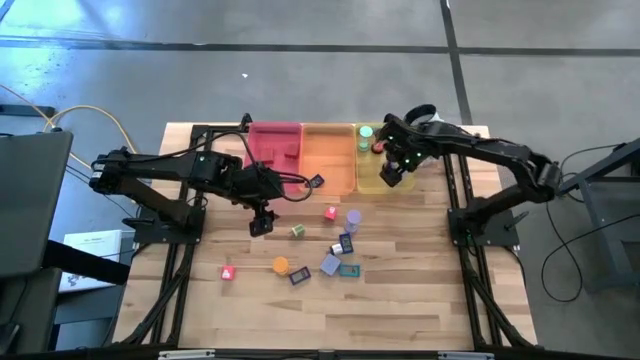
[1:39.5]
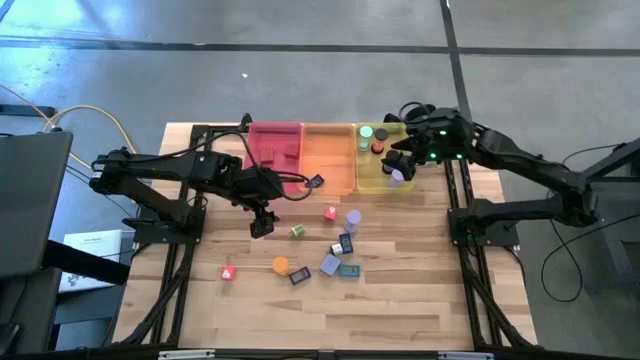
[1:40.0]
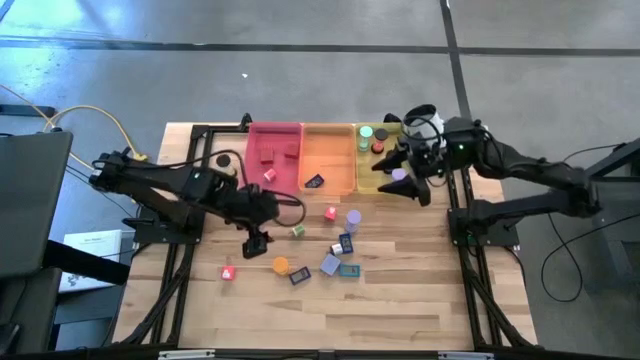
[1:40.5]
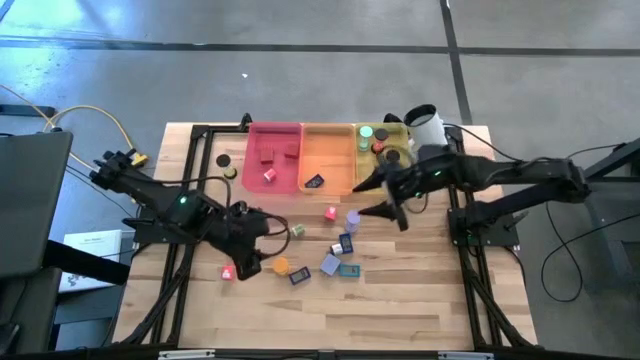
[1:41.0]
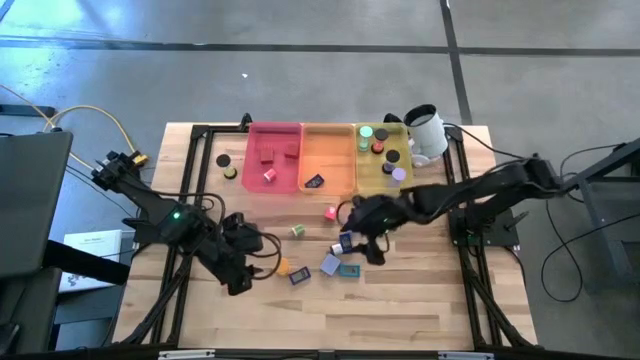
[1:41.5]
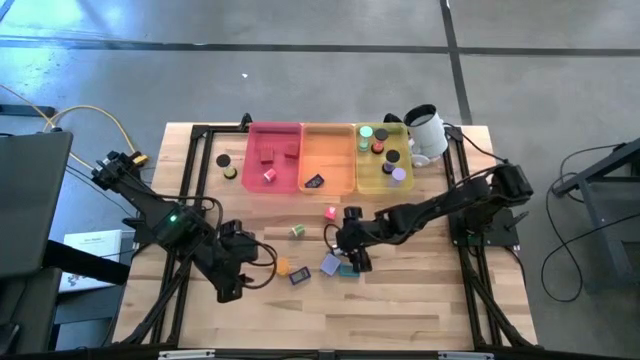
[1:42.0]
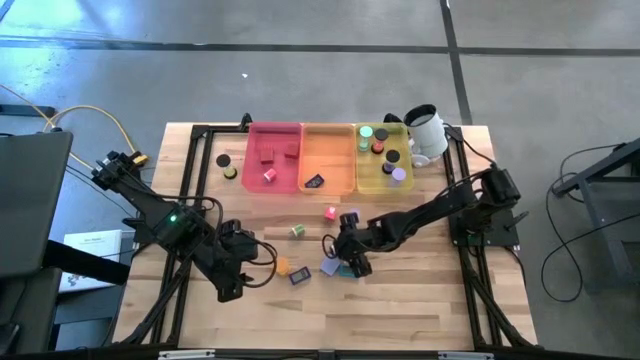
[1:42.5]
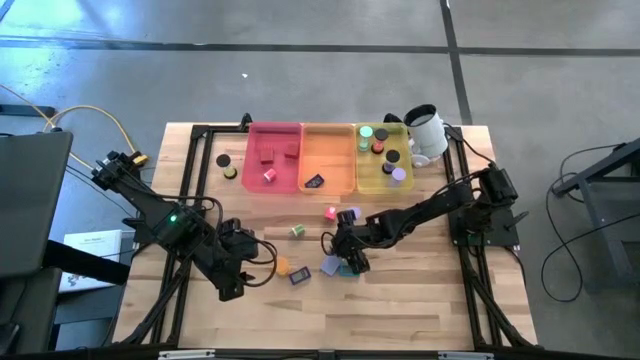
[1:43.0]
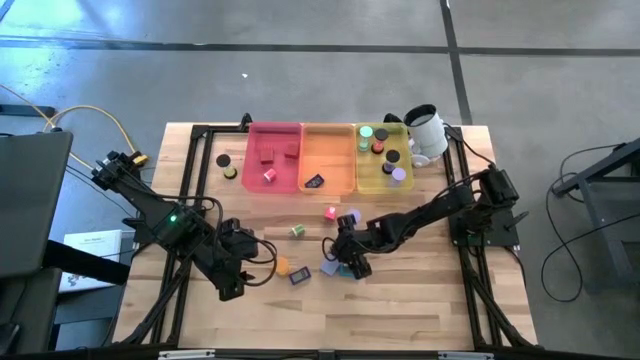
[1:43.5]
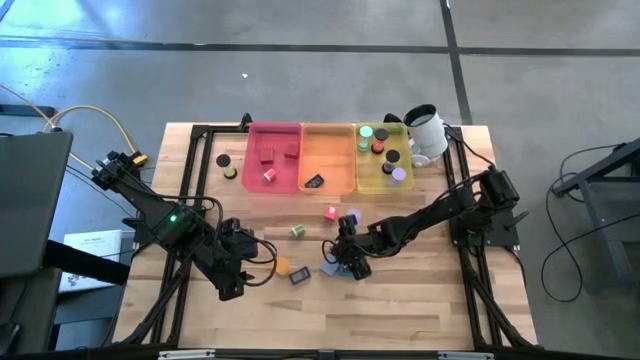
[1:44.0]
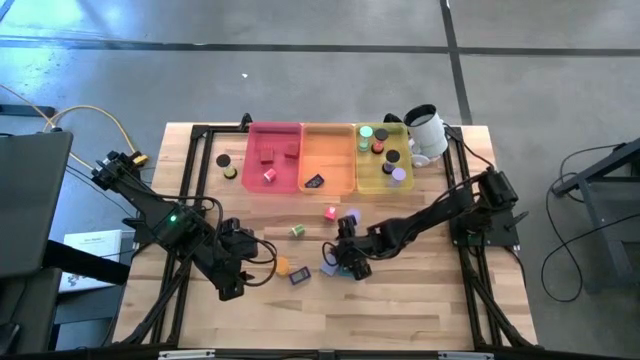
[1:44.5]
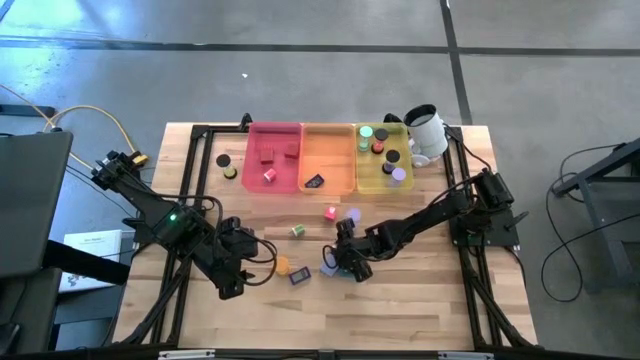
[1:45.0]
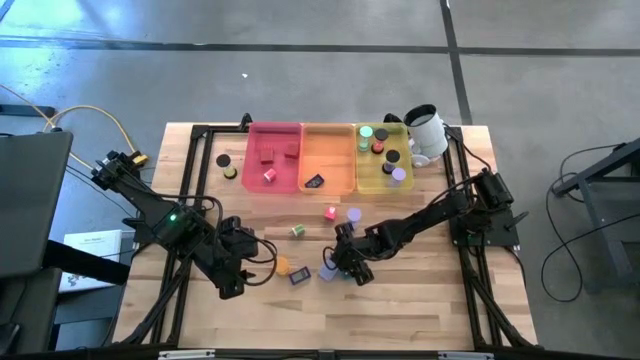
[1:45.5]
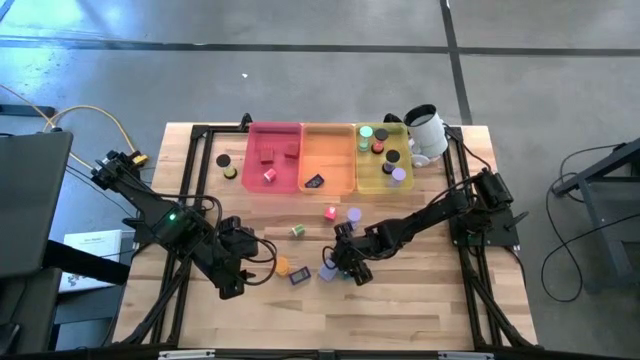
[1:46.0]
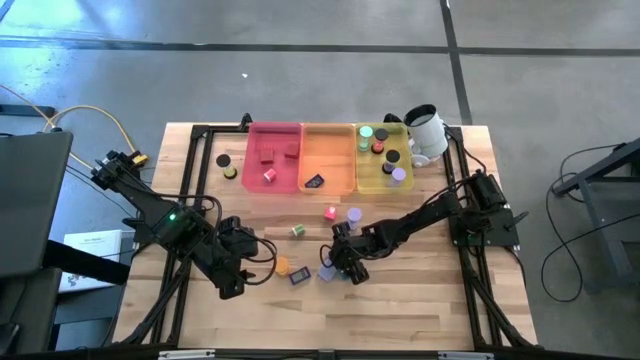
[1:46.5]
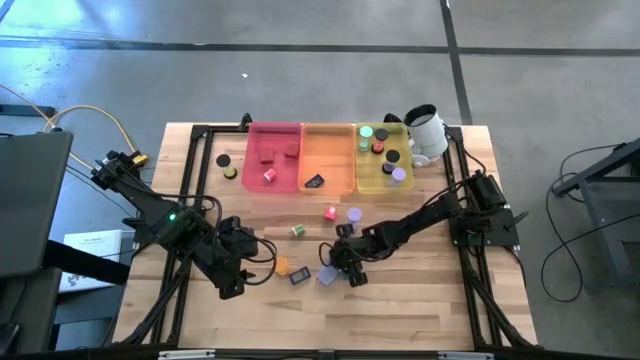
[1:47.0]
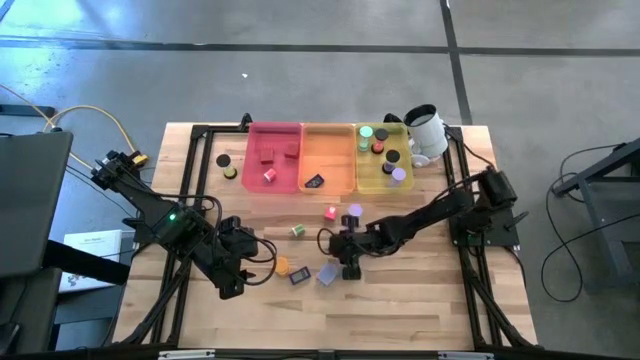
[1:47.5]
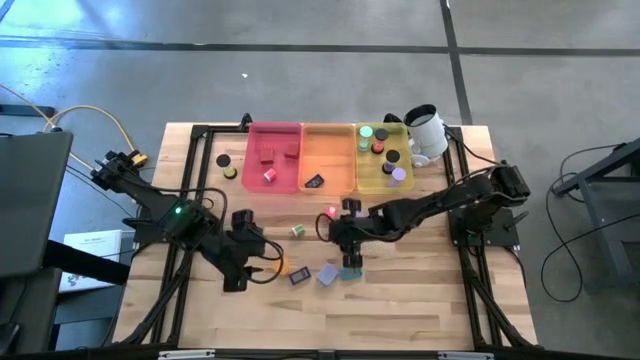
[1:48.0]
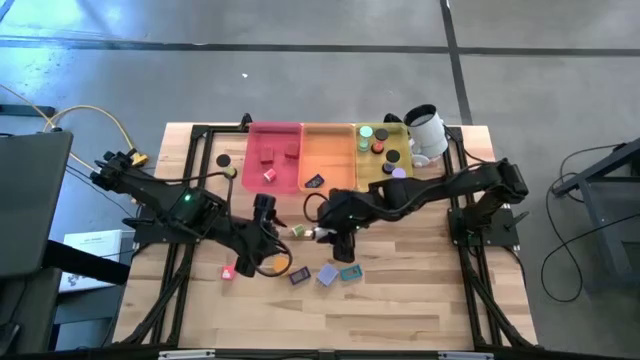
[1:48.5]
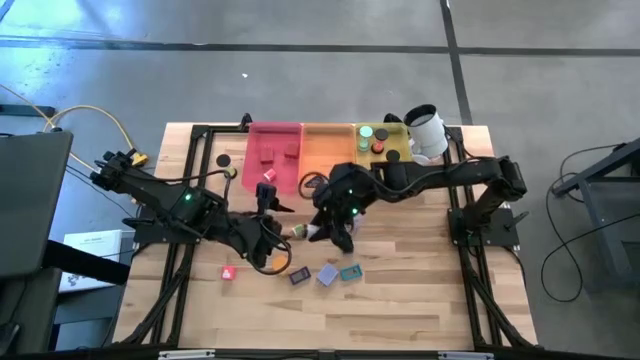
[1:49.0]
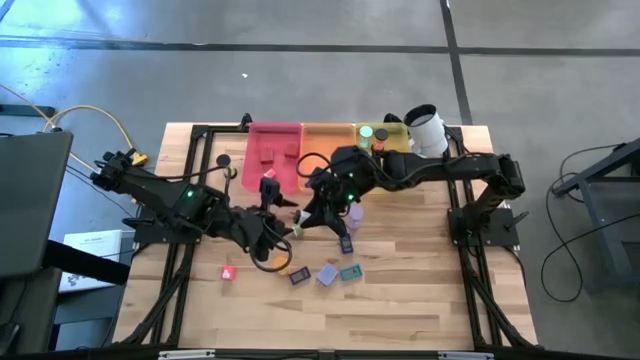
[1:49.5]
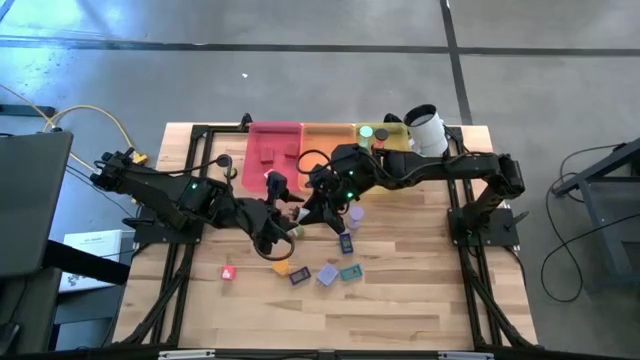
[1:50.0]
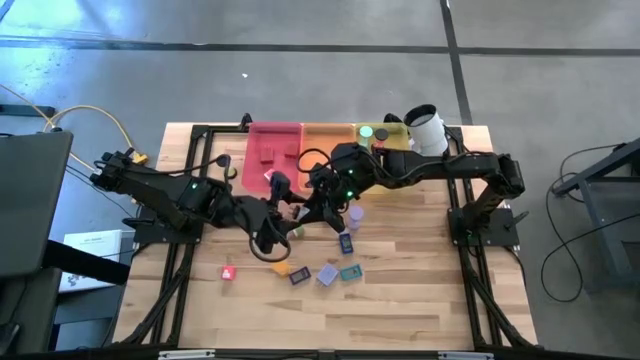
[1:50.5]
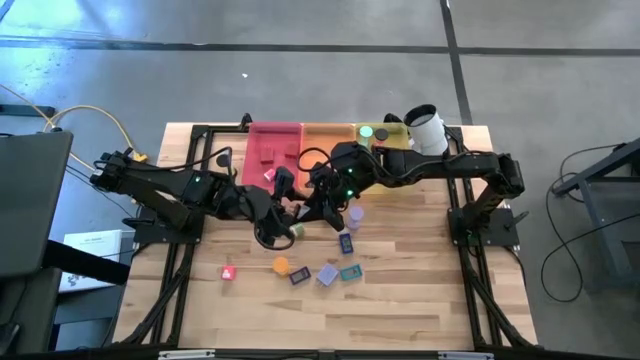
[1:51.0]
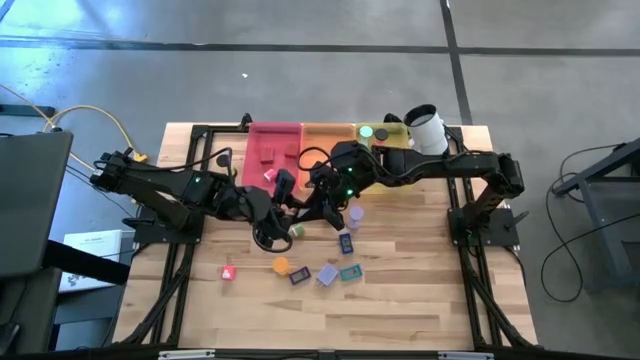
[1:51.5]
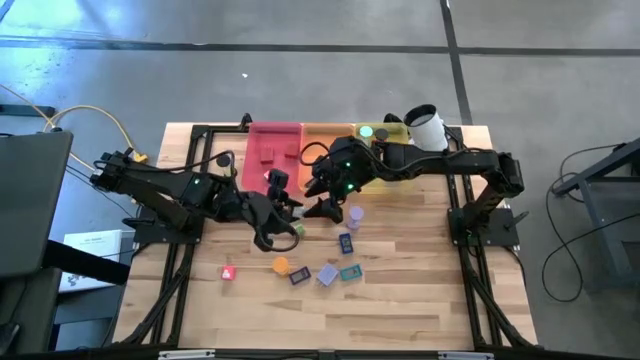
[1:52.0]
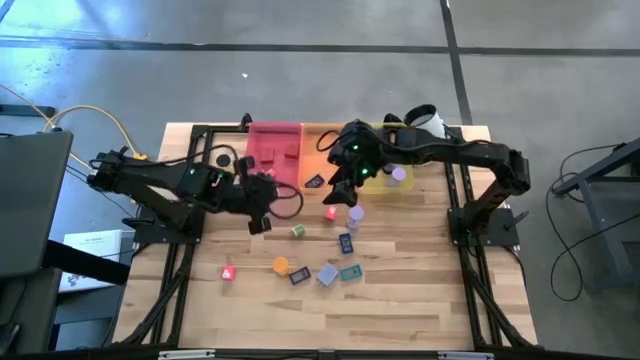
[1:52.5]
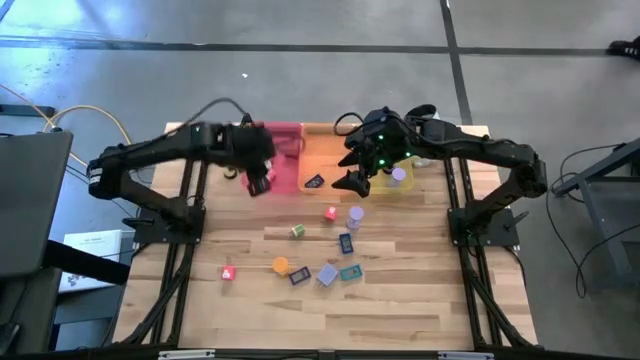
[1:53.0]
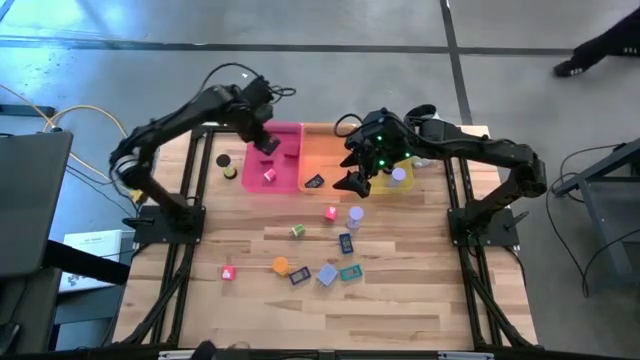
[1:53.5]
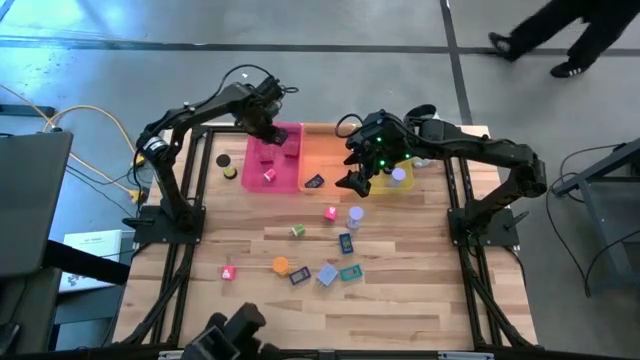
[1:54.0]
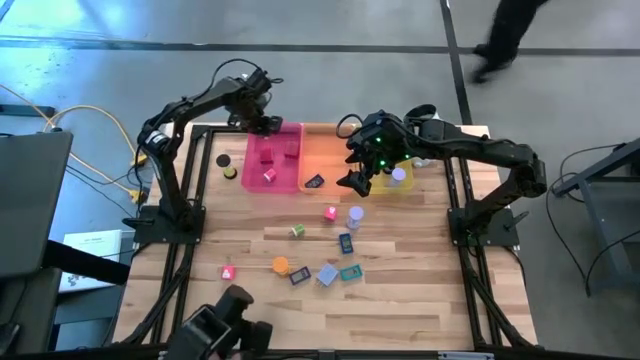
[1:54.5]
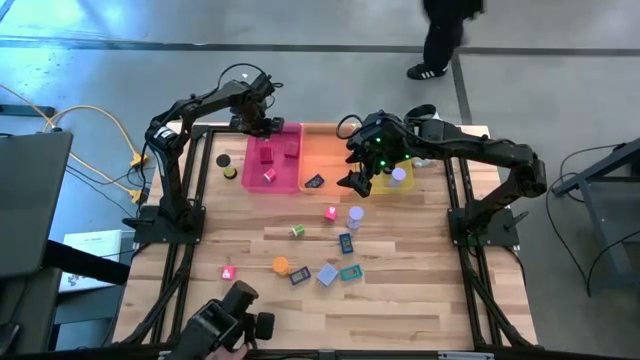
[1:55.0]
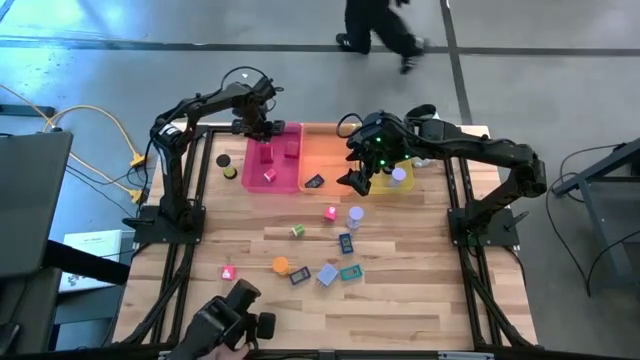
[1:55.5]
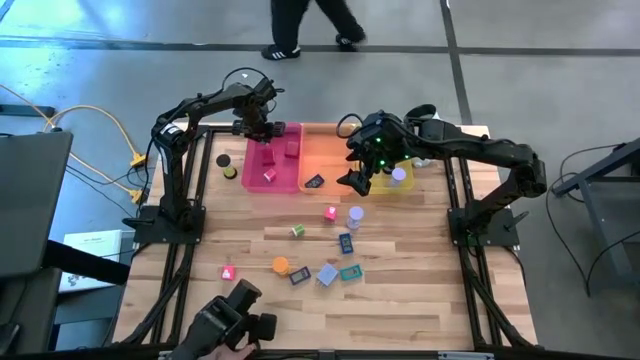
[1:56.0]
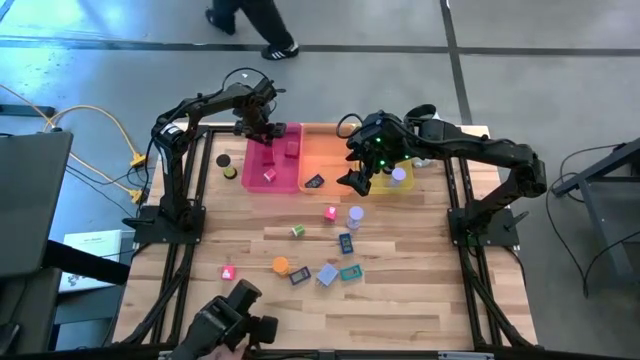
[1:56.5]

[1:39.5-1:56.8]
Task: Pick & Place Office items
Put the white charger adapter into the pink bin

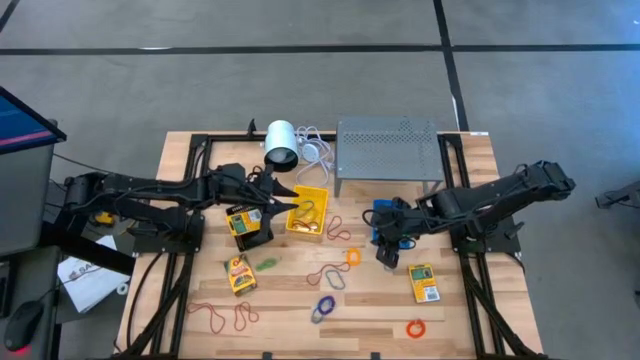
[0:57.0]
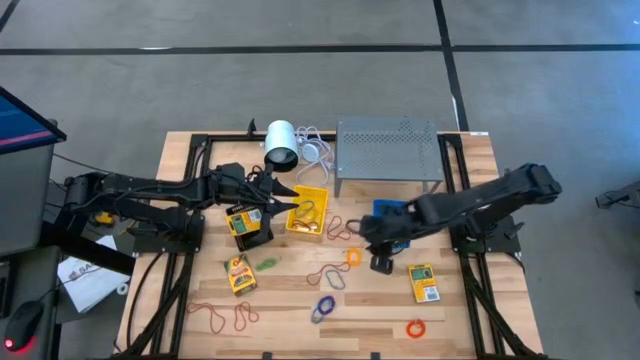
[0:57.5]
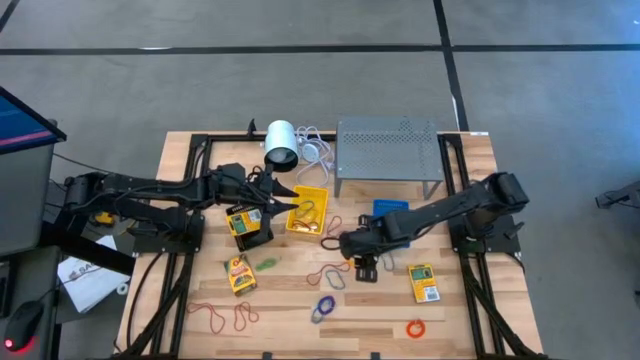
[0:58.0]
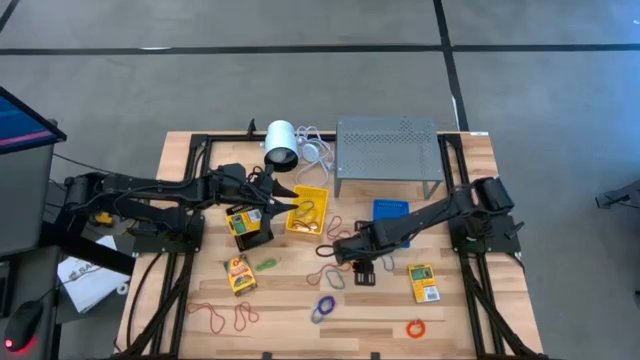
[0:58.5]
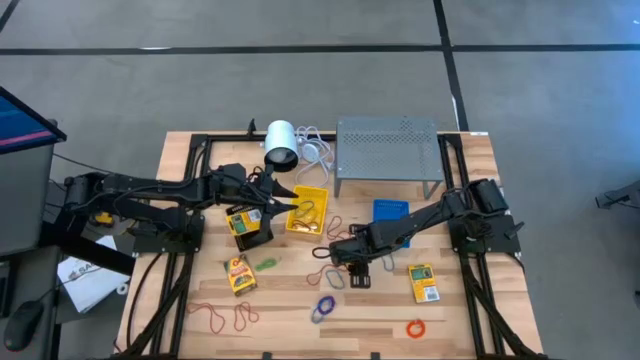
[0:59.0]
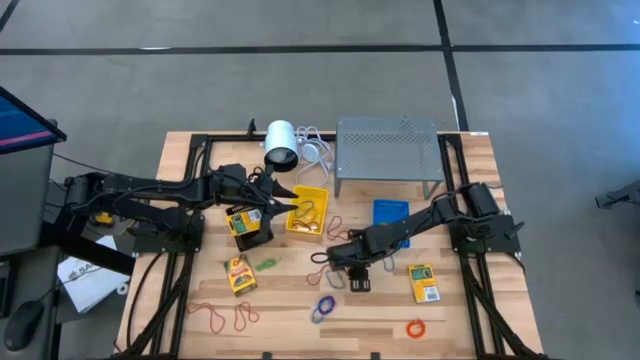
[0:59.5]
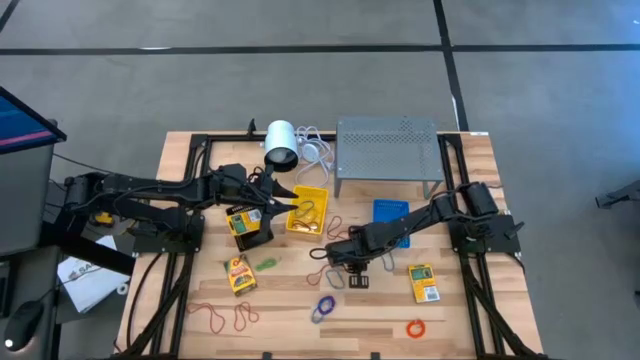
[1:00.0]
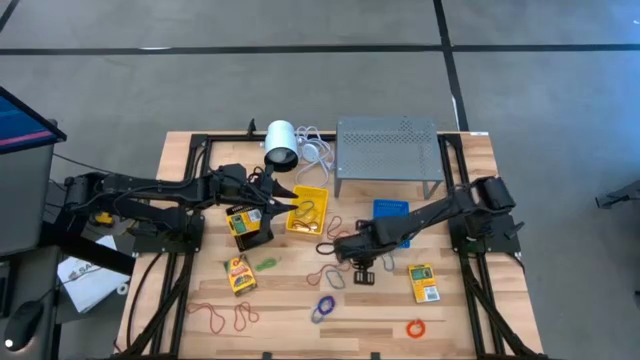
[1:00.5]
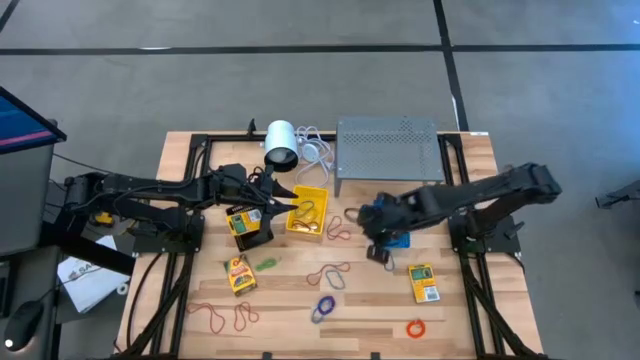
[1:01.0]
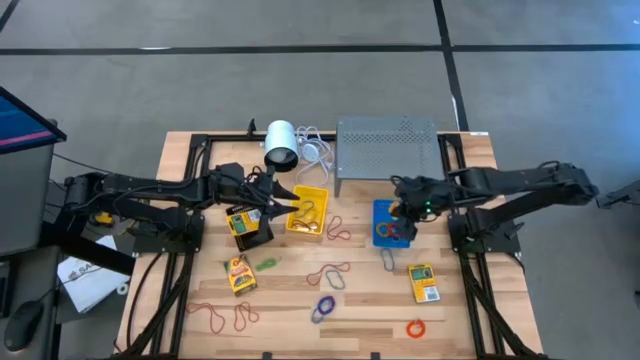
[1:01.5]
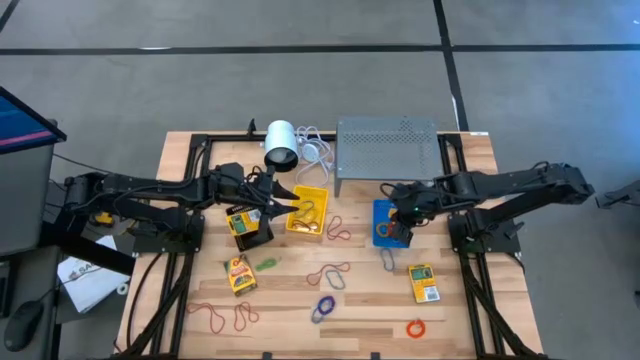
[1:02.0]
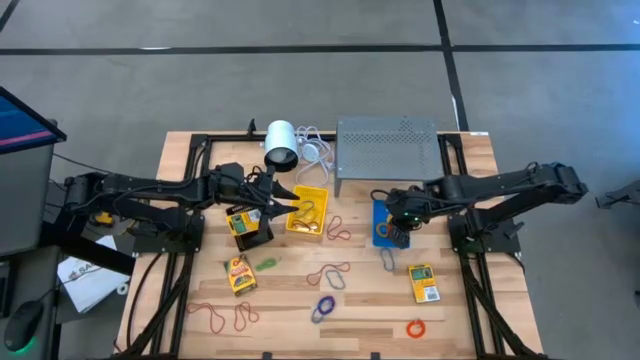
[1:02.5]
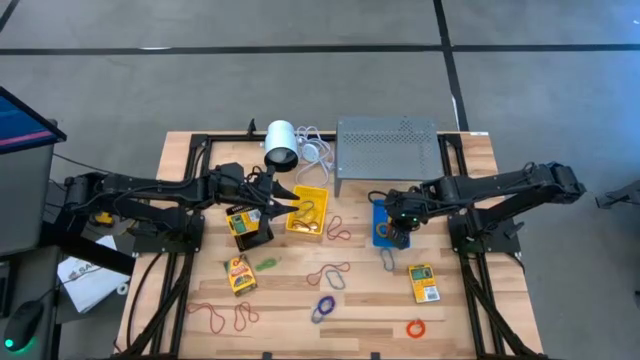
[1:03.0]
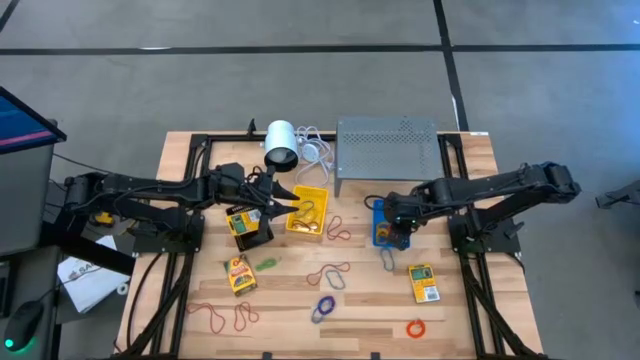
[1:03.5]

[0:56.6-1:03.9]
Task: Pick & Place Office Desk Supplies
Put the yellow elastic key ring into the blue basket
